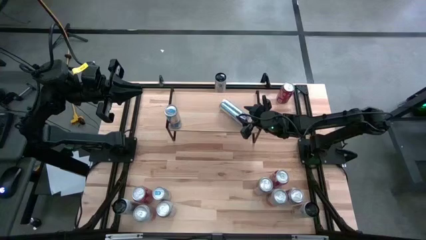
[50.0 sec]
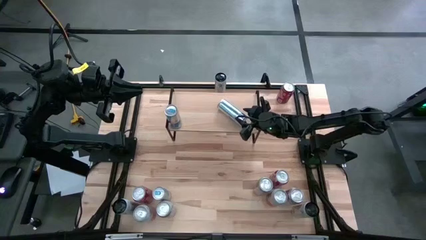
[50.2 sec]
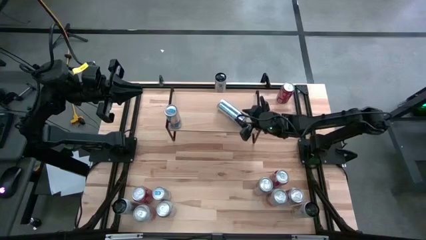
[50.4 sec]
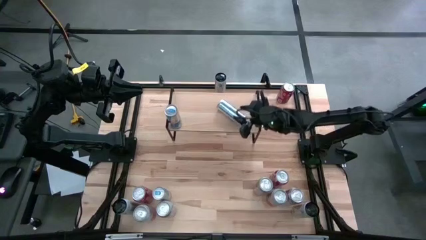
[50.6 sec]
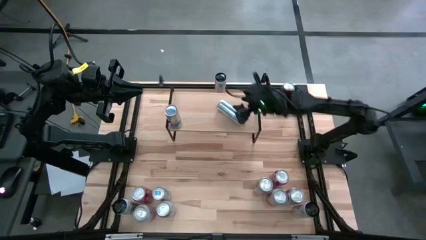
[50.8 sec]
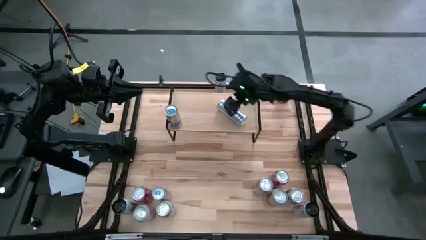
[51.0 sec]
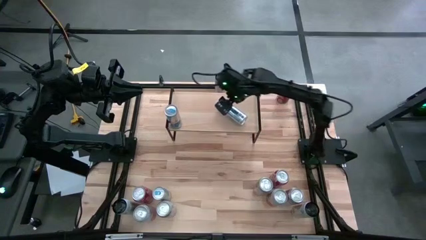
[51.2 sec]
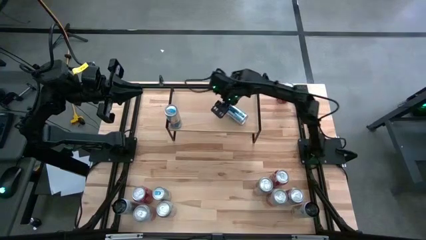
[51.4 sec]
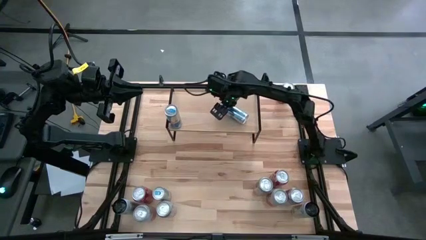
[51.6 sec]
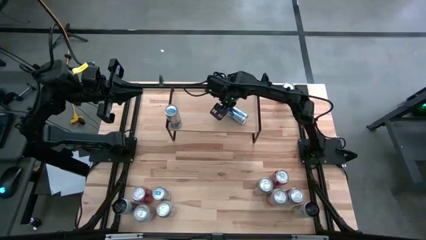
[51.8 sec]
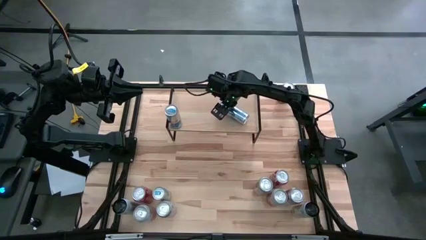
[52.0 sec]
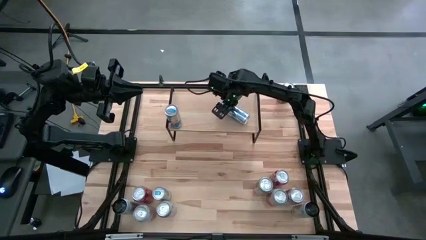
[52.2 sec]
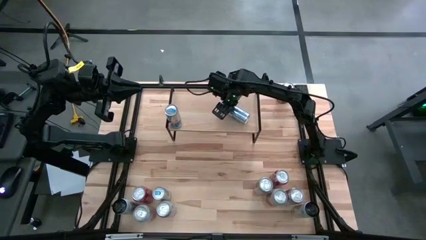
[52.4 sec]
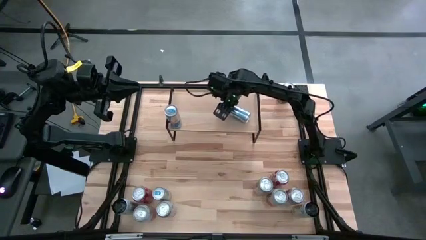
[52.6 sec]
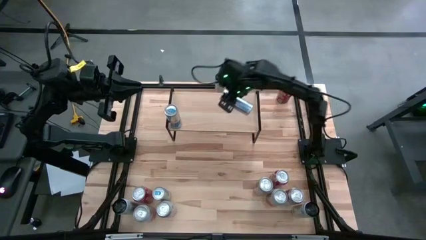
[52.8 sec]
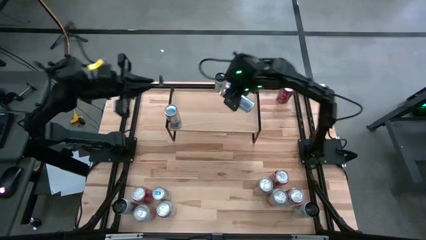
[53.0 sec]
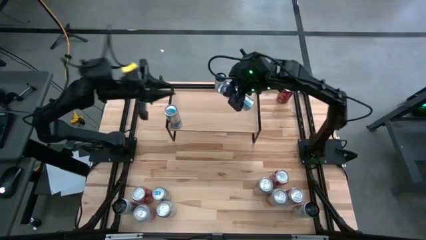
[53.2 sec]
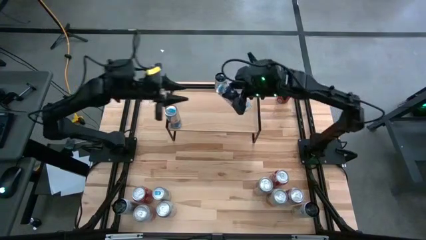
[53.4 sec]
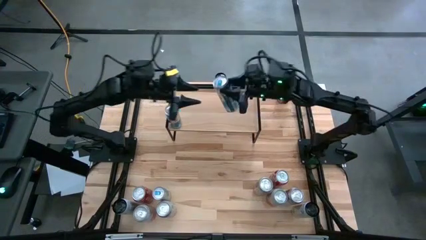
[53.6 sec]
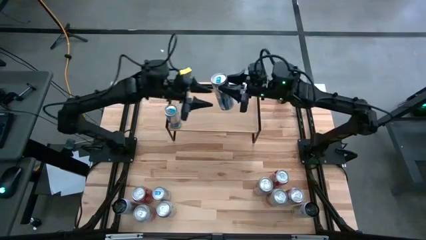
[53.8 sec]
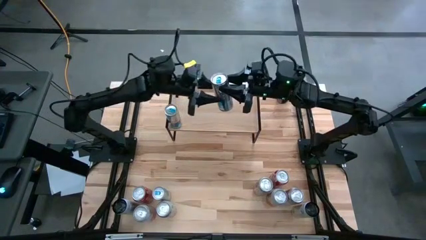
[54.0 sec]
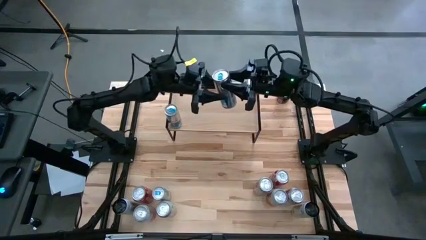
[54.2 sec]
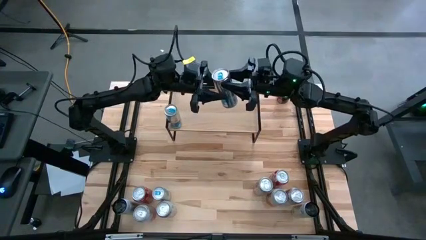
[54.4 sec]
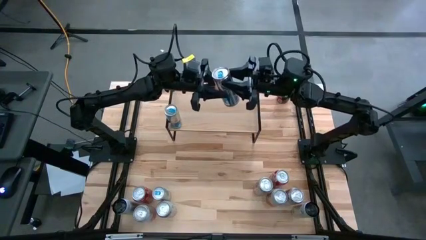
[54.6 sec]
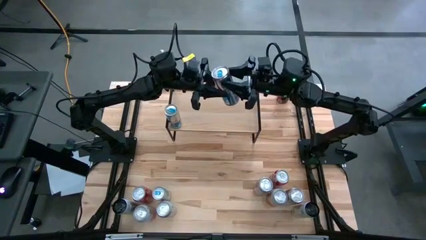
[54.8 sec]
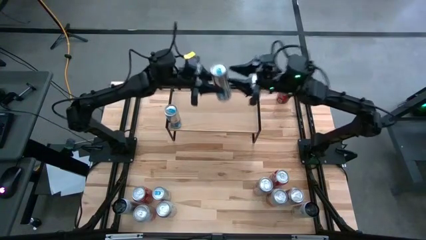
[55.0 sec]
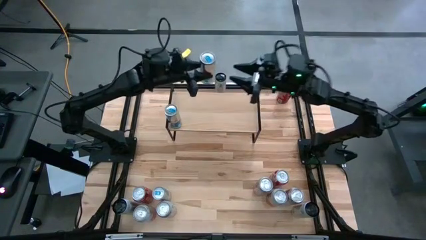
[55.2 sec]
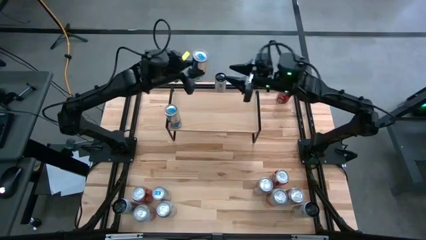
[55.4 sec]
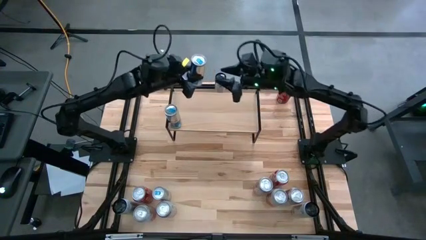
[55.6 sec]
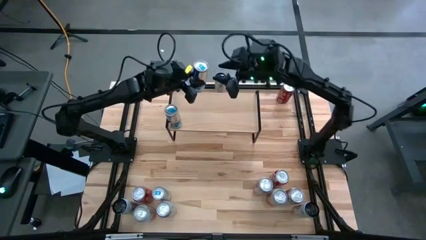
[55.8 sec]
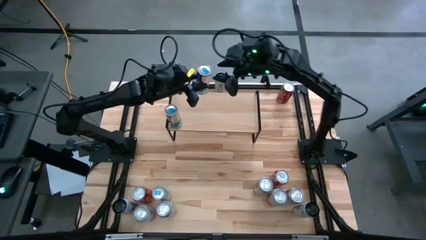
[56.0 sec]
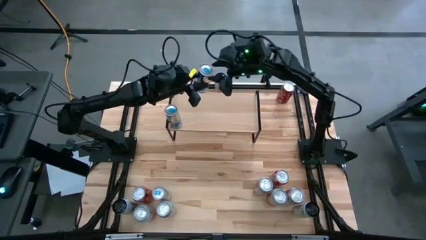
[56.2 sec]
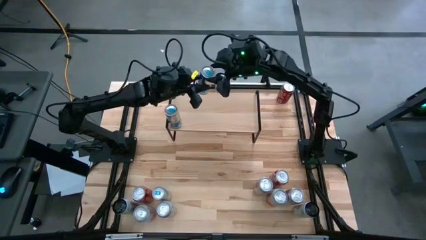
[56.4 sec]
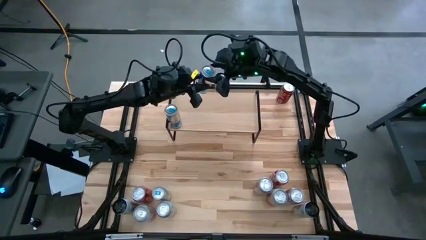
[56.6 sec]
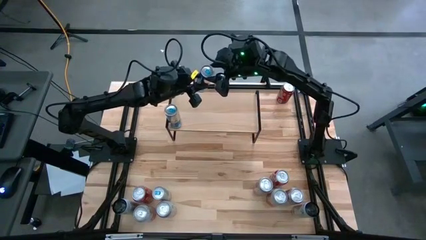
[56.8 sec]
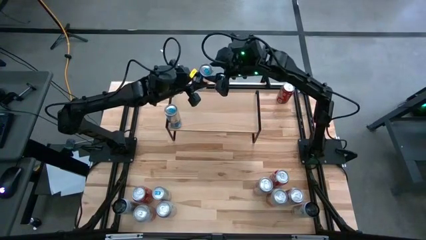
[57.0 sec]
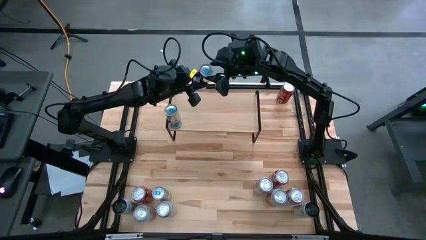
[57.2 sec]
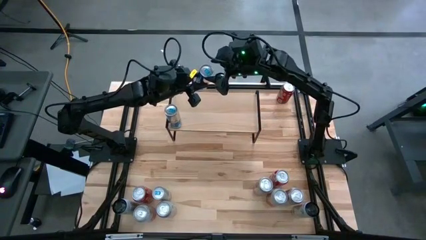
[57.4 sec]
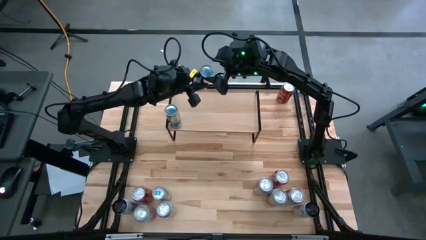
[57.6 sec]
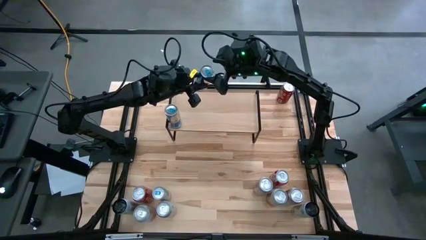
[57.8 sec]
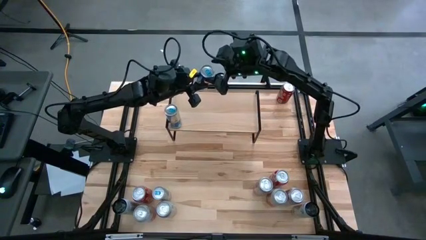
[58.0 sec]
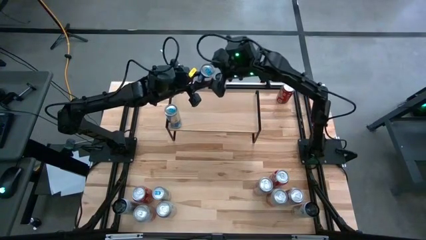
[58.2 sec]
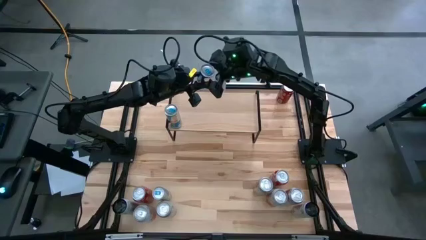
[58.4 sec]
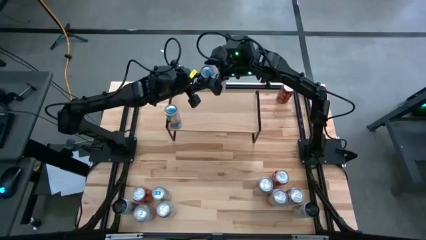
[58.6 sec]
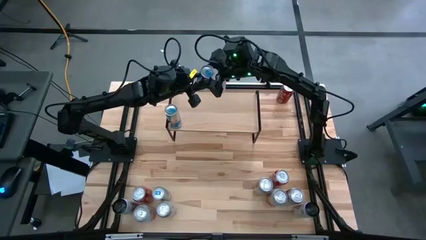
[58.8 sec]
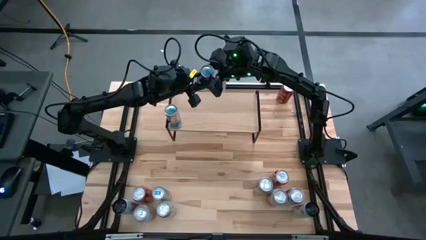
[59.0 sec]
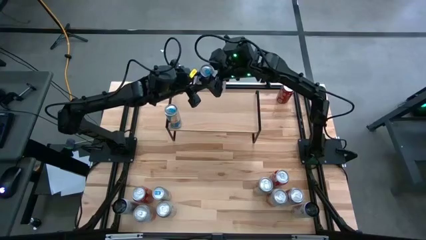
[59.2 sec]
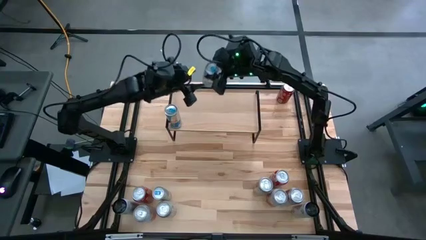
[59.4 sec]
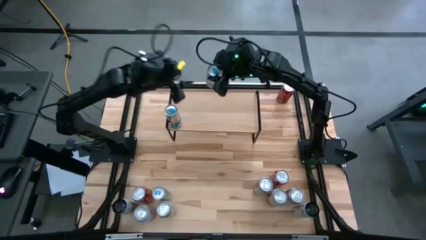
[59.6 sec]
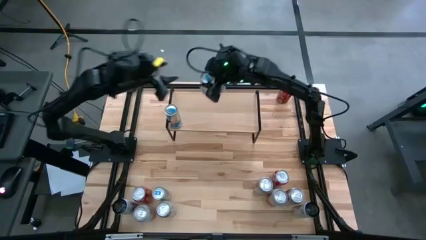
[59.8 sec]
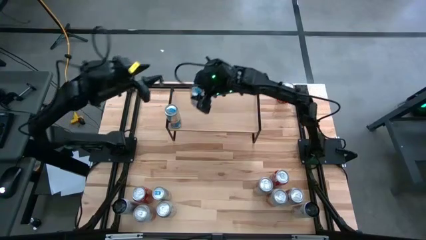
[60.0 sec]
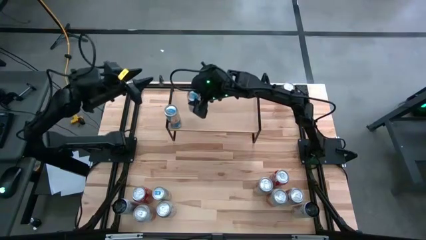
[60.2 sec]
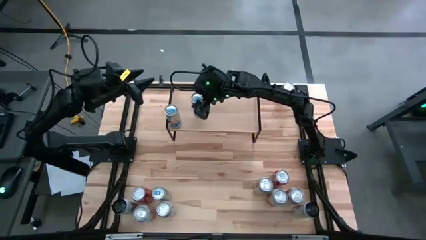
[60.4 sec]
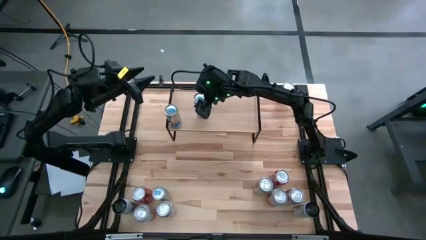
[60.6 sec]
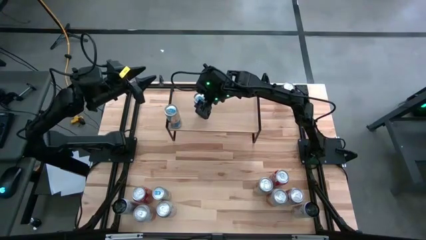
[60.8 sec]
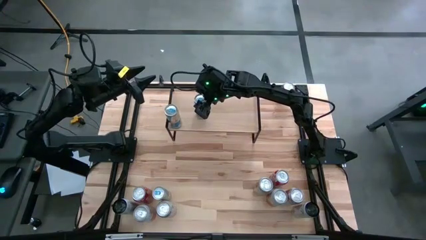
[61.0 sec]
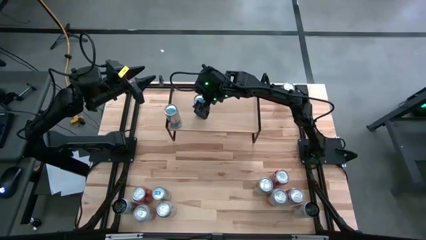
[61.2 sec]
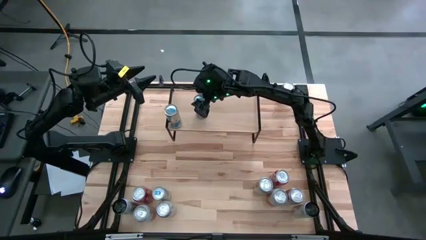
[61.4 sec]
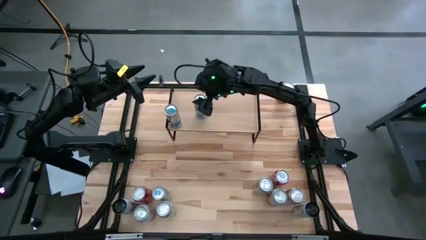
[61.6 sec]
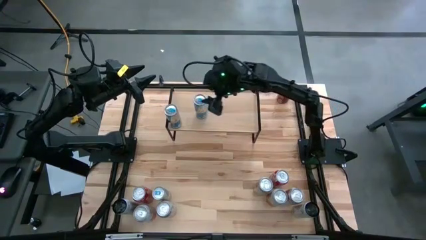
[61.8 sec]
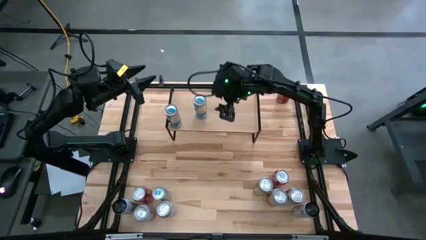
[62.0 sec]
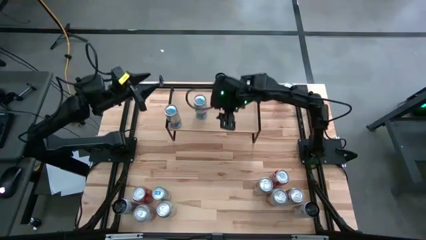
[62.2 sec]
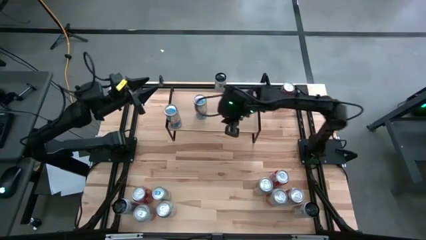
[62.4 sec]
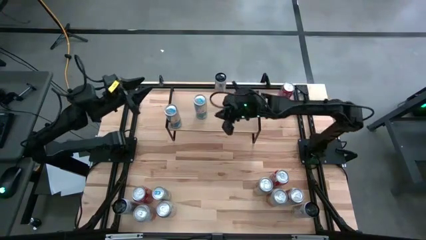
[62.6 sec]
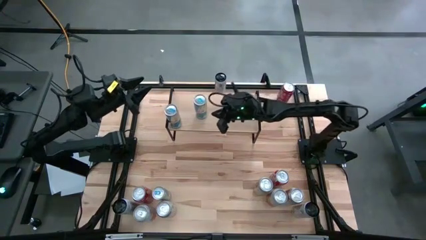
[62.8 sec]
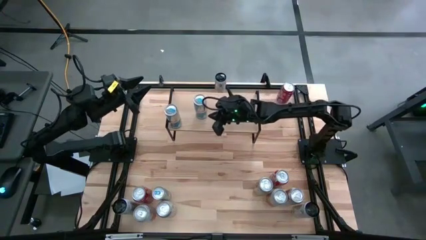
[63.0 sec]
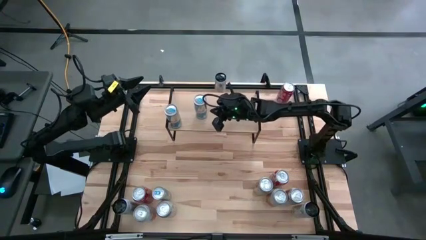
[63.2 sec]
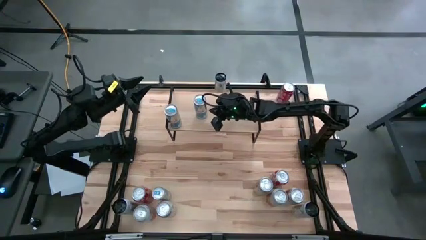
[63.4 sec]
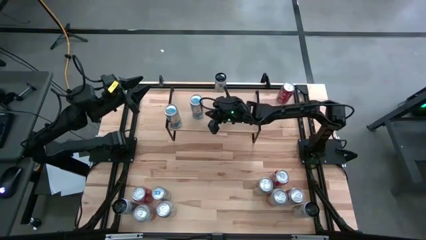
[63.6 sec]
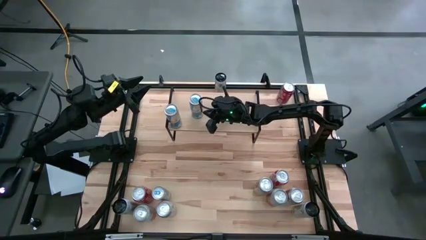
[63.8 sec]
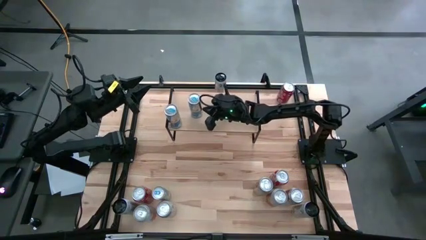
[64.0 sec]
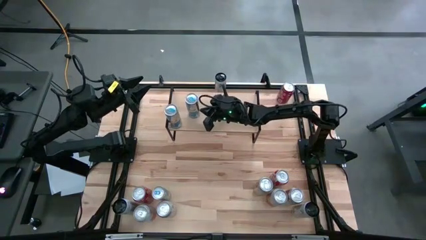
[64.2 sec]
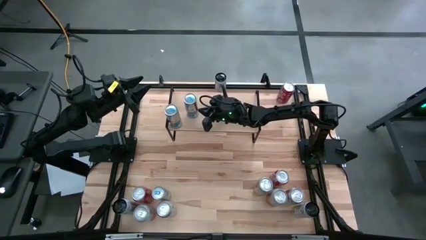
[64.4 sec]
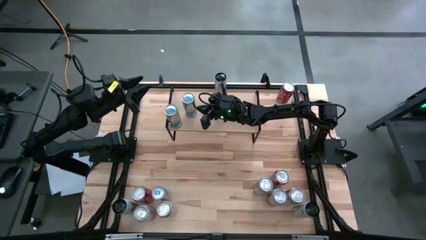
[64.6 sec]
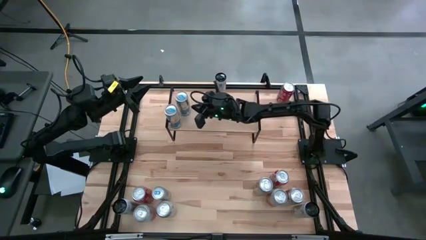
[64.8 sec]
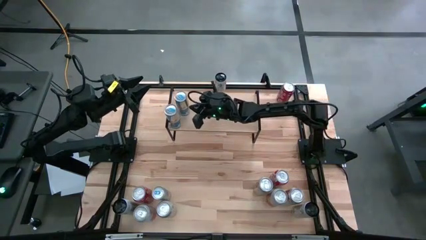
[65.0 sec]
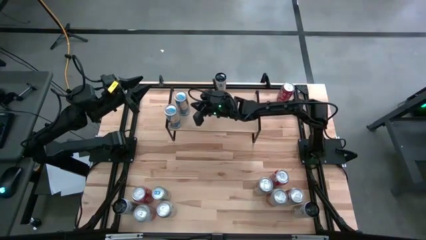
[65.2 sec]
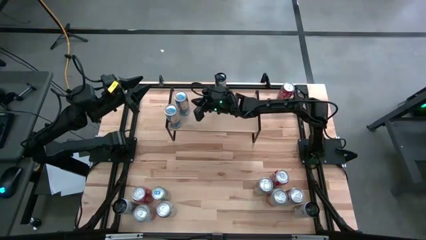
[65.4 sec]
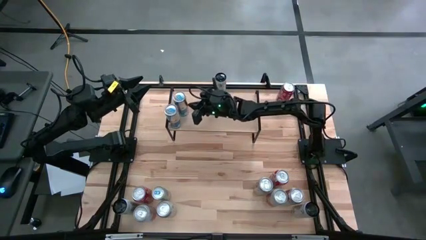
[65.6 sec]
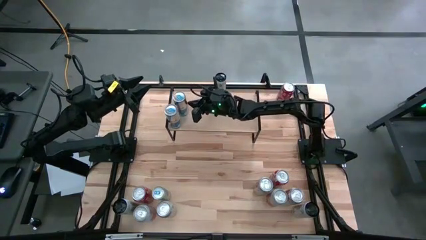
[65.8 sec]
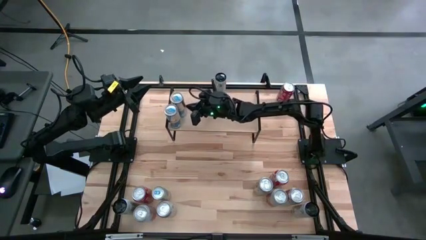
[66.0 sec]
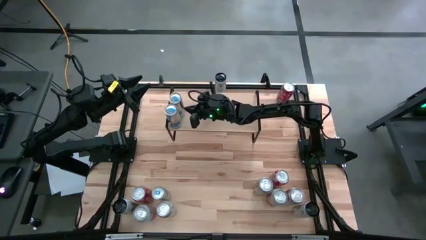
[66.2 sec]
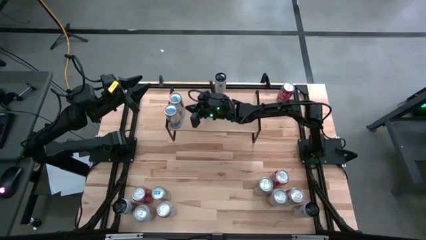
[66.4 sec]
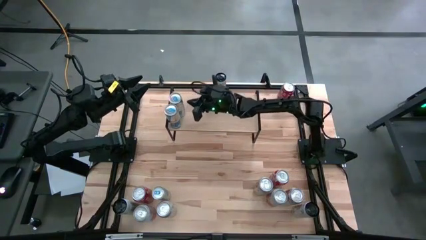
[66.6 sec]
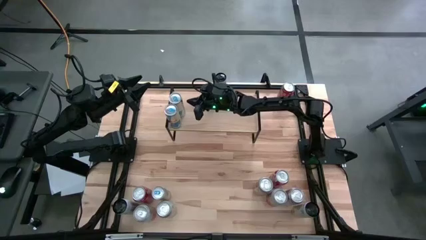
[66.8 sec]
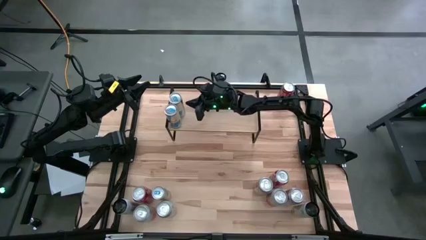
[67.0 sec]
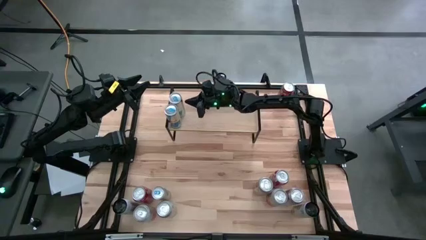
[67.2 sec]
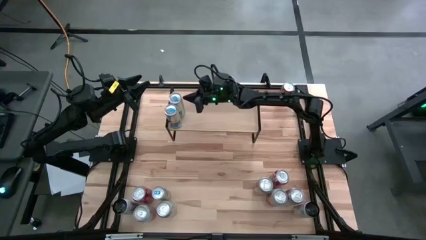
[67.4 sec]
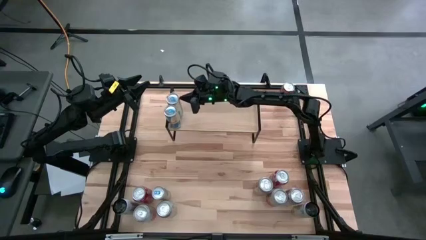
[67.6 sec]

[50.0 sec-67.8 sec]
Task: Place canned beverage on shelf
Put the right blue soda can aligned with the other blue soda can on the shelf
